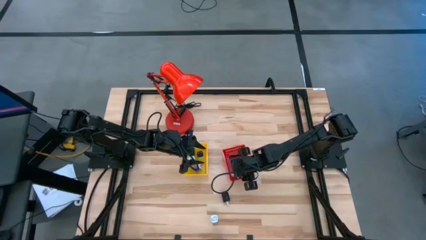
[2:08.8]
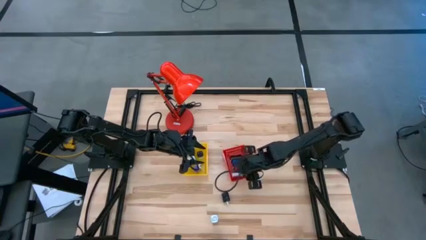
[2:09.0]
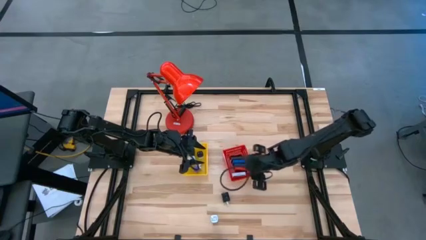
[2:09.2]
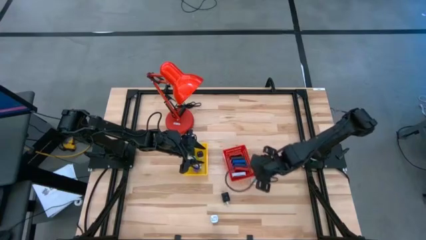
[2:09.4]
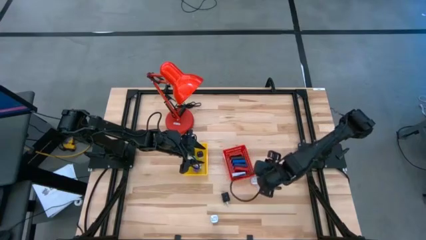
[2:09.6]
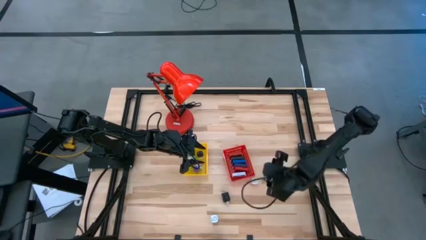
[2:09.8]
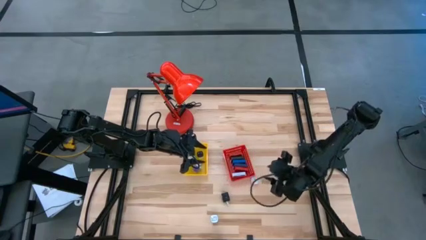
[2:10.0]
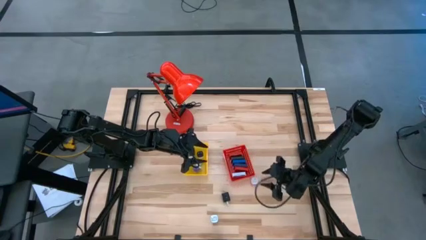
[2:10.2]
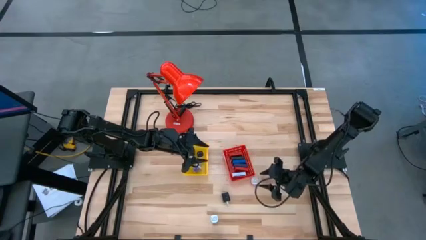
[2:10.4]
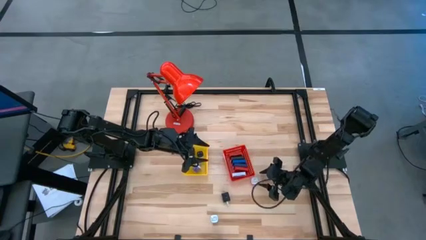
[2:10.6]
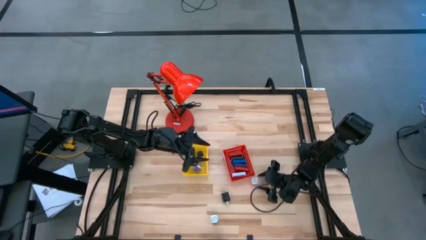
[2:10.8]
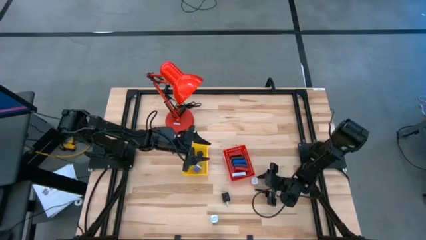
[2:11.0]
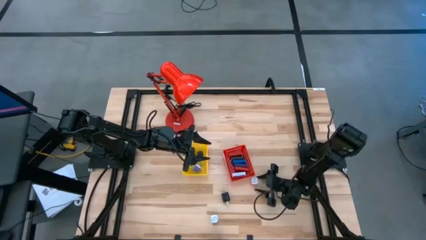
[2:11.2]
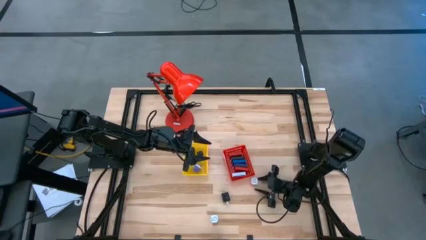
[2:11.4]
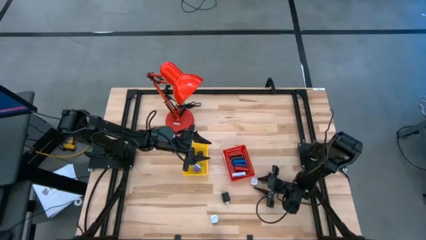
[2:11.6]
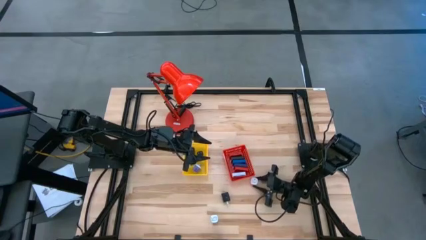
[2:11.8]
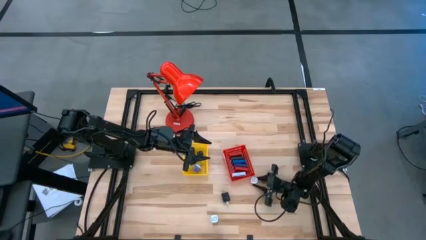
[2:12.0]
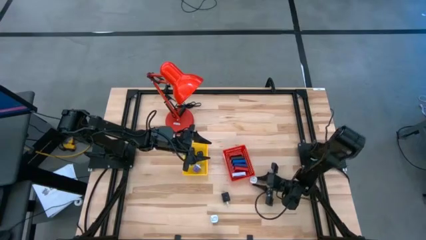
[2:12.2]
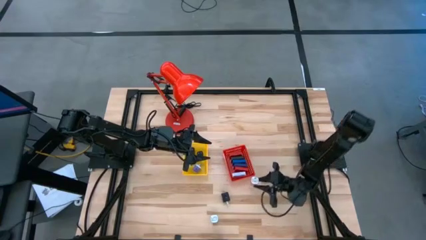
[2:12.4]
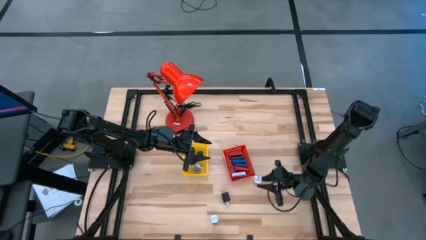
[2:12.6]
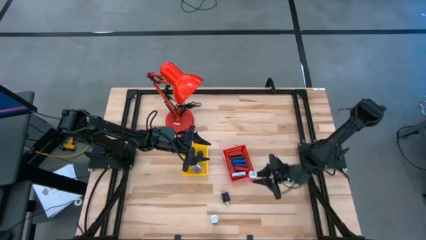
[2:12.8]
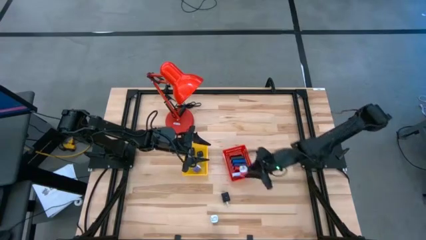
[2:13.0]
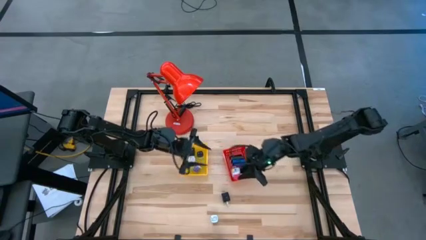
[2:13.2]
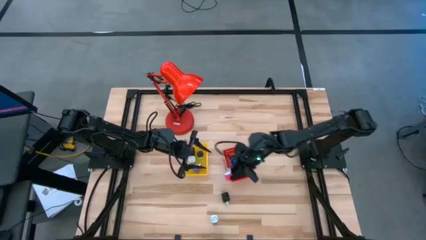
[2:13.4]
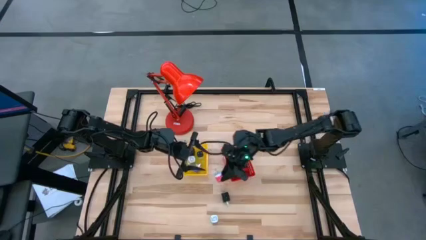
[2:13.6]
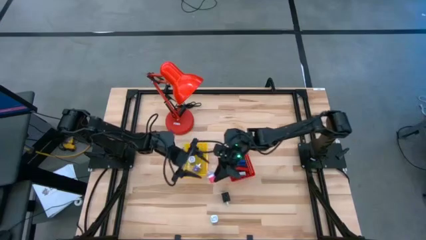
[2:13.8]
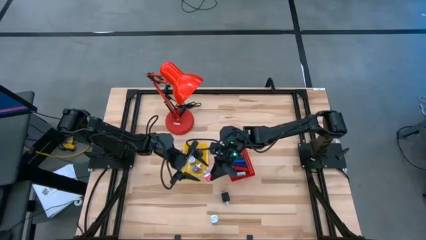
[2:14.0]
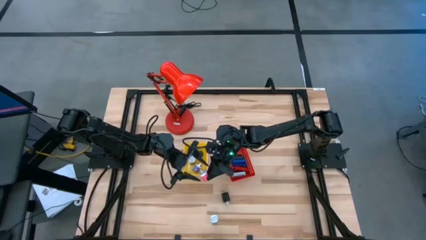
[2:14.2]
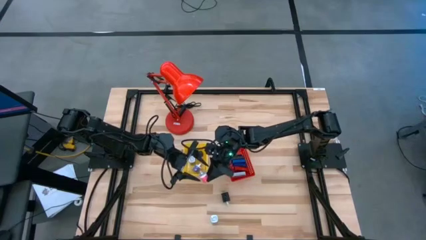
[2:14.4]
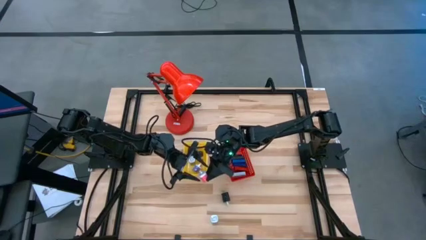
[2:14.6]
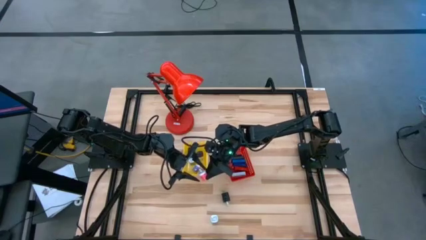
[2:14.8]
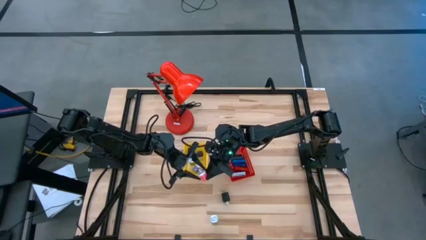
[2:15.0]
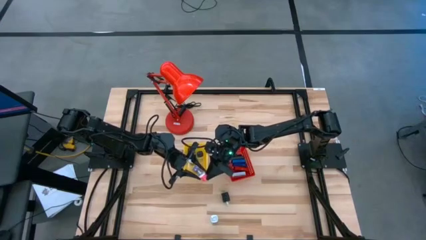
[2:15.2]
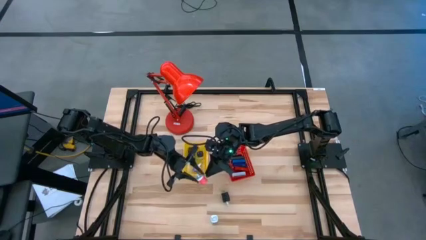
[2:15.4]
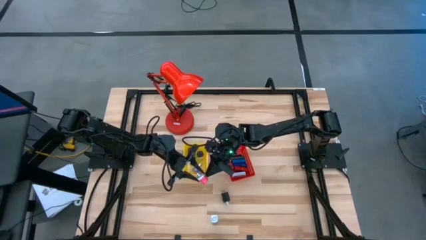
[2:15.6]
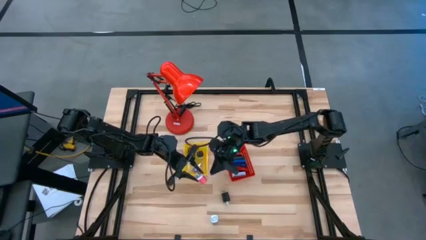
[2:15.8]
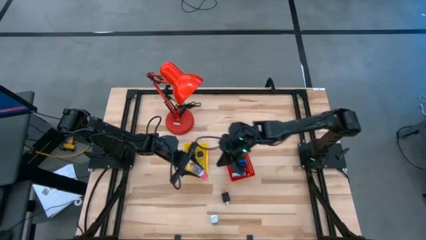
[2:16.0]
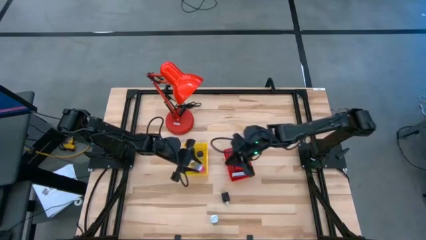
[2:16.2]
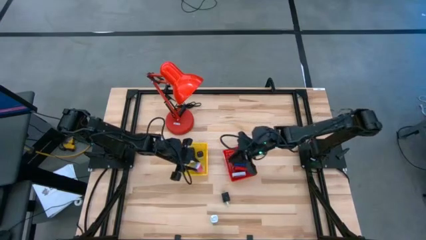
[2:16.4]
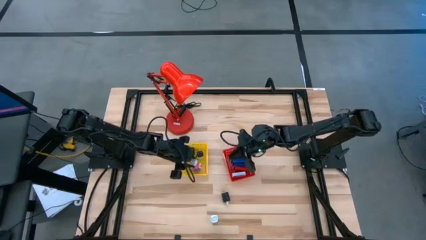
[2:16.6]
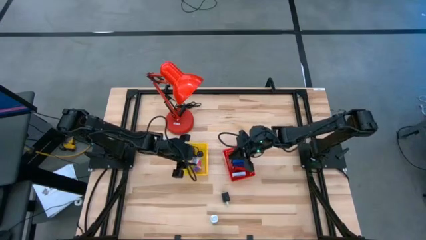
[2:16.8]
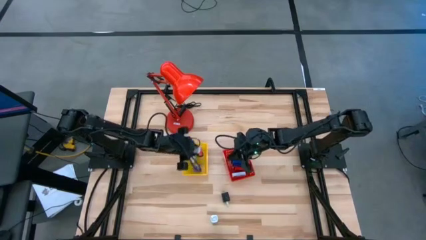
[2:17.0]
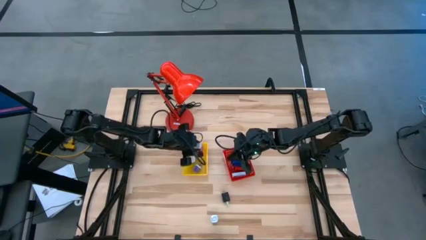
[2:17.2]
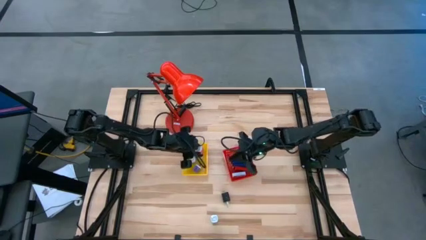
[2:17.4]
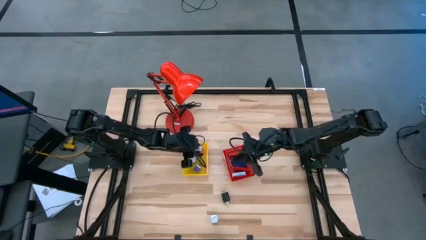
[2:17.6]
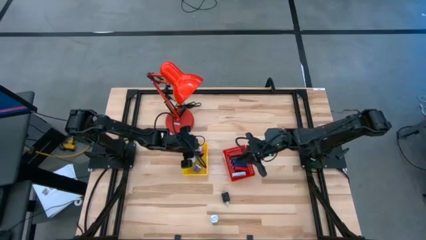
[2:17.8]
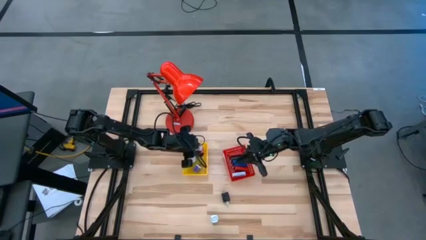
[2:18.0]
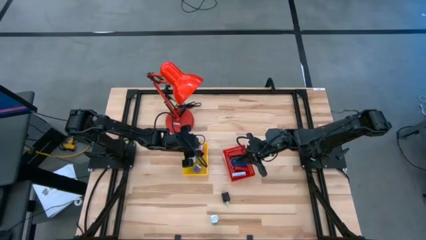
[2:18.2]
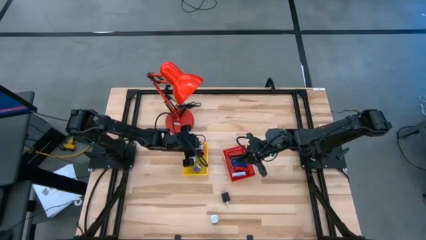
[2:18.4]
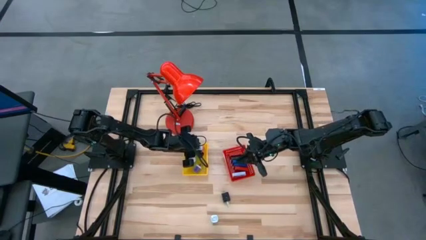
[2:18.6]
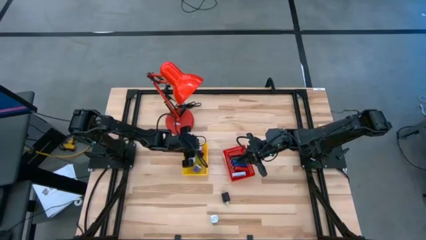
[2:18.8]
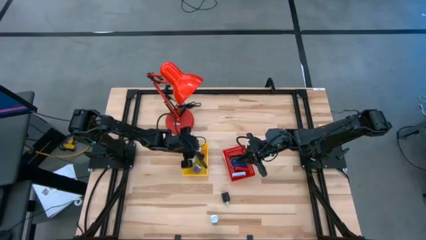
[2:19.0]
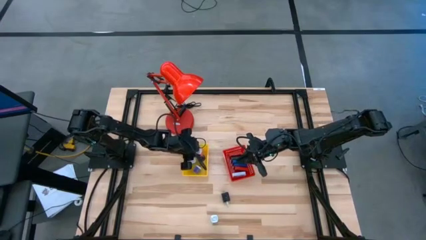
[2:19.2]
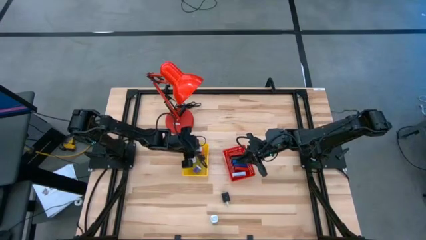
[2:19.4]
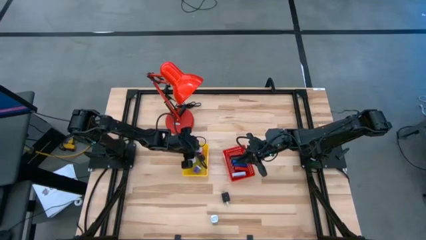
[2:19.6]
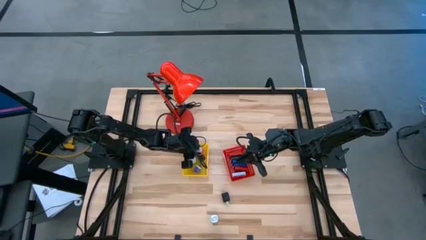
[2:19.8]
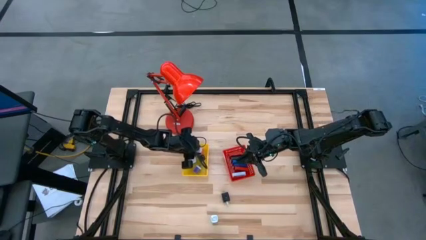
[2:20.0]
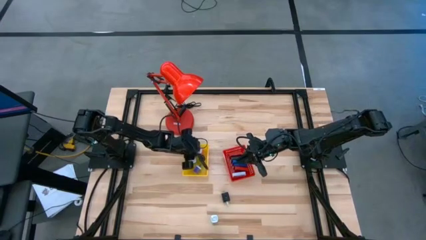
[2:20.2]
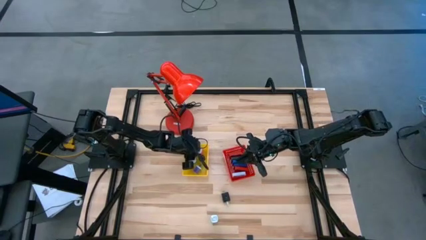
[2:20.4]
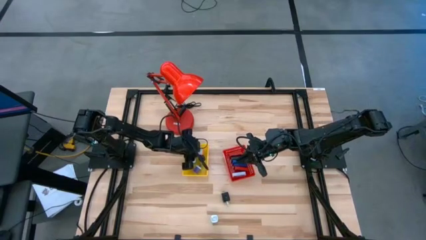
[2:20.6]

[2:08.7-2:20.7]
Task: Pick & Place Office items
Put the red charger adapter into the yellow bin

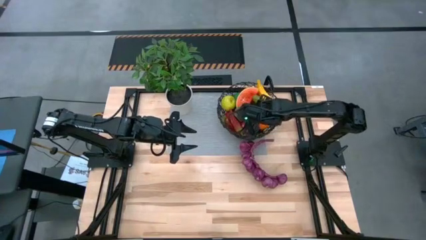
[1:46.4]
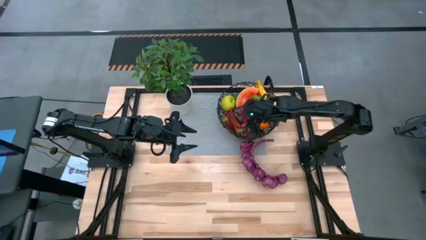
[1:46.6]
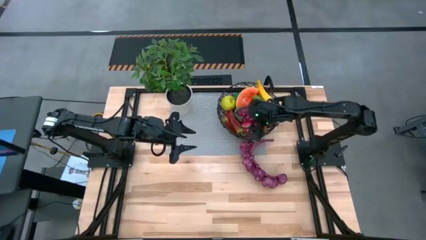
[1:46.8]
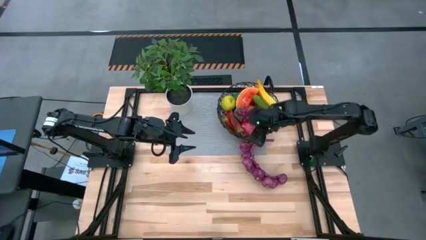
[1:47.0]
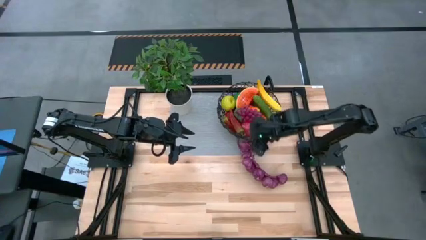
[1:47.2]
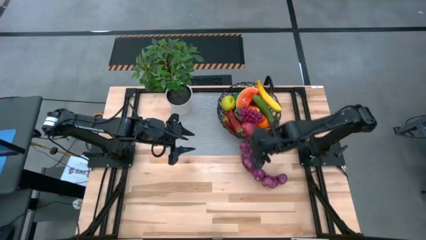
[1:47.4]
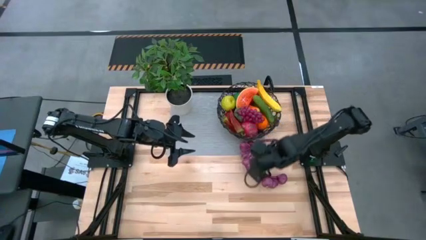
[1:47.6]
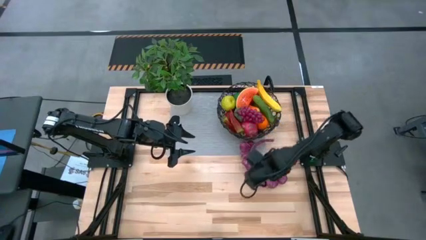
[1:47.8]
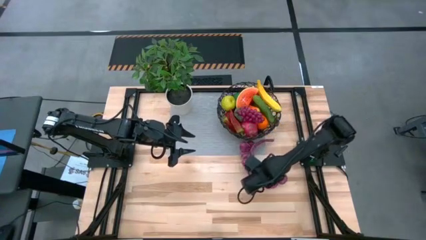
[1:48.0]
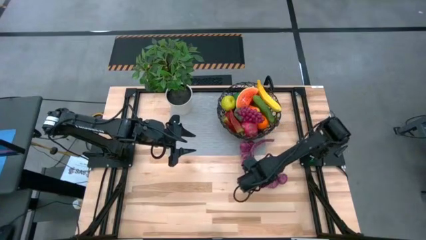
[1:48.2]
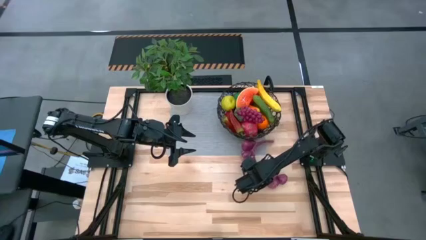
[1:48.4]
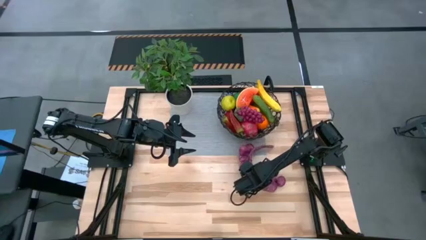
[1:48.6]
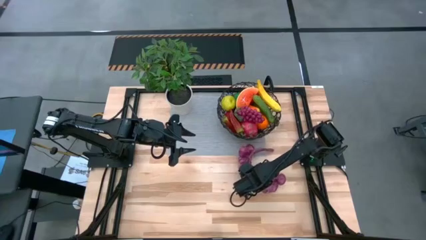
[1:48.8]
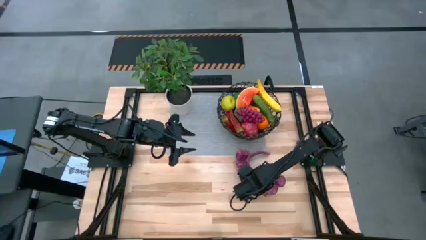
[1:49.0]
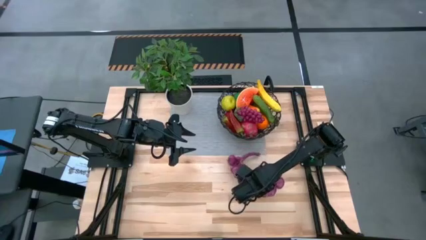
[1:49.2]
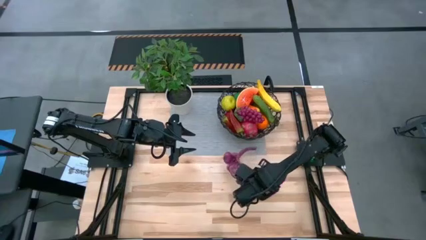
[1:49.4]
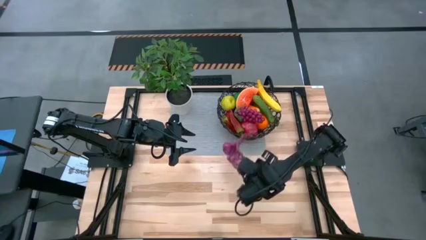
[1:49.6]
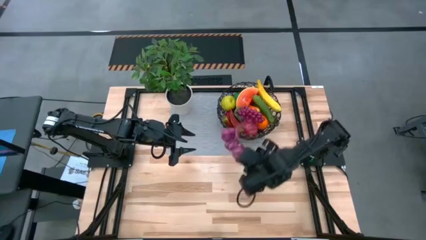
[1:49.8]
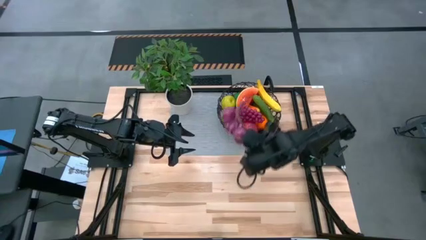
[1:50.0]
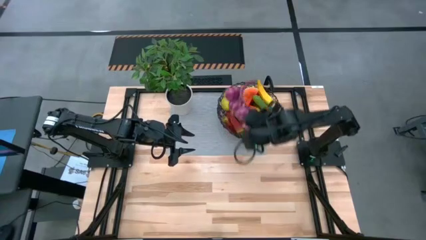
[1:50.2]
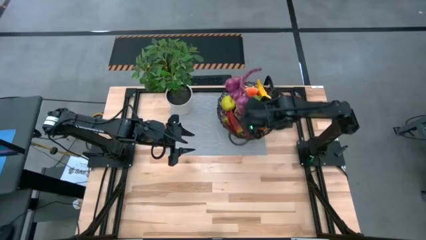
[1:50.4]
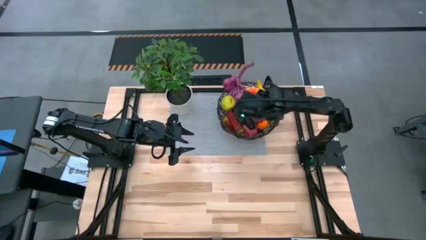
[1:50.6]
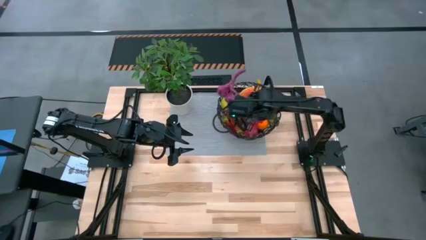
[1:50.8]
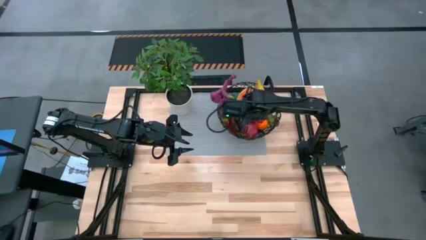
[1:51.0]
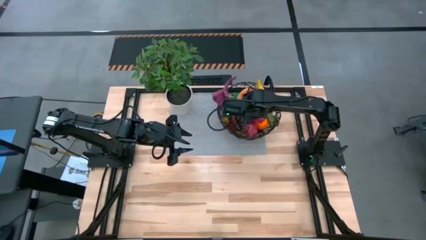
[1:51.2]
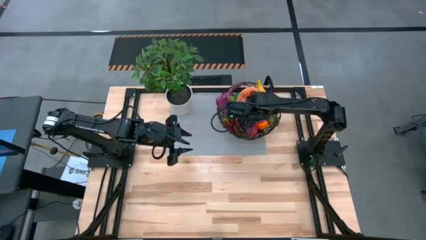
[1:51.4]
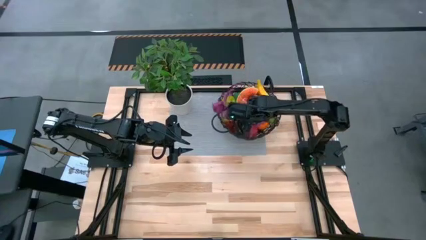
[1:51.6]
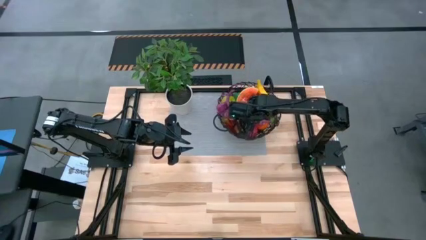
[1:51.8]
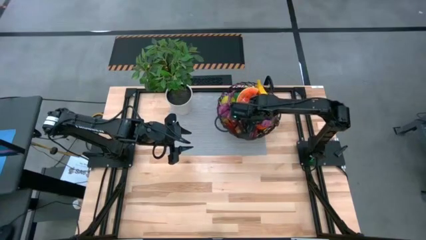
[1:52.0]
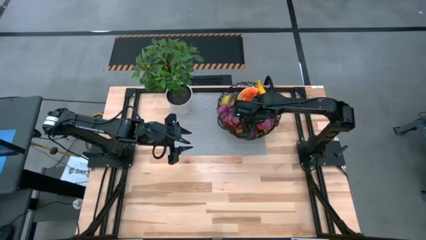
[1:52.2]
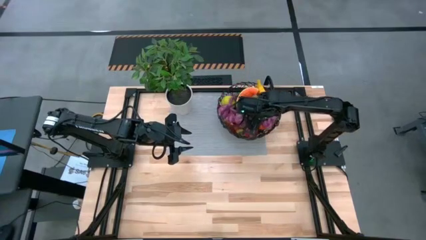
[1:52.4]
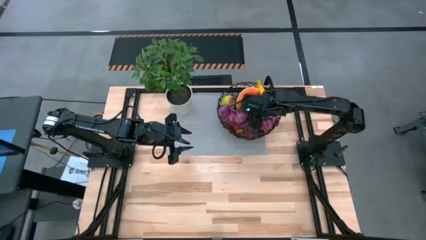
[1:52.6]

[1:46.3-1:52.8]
Task: Build produce basket
Put the purple garlic into the wire basket
